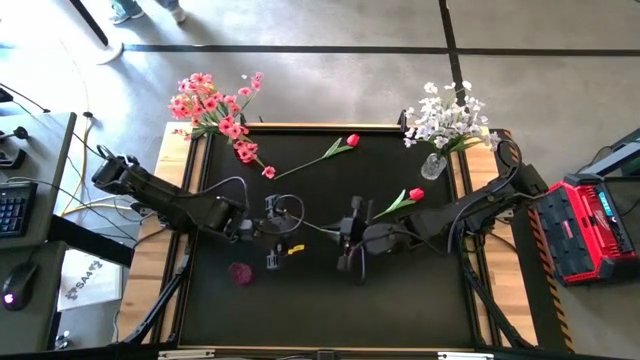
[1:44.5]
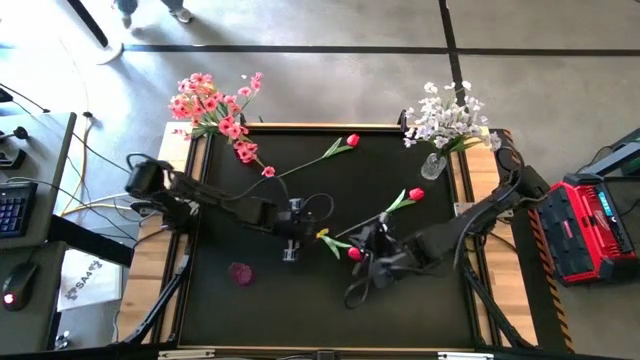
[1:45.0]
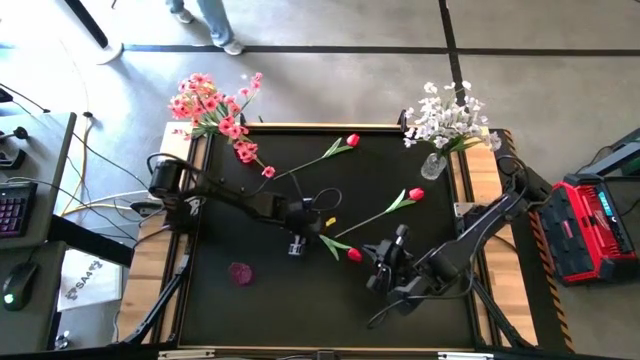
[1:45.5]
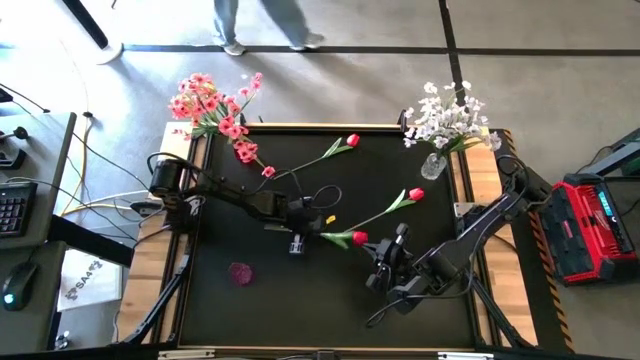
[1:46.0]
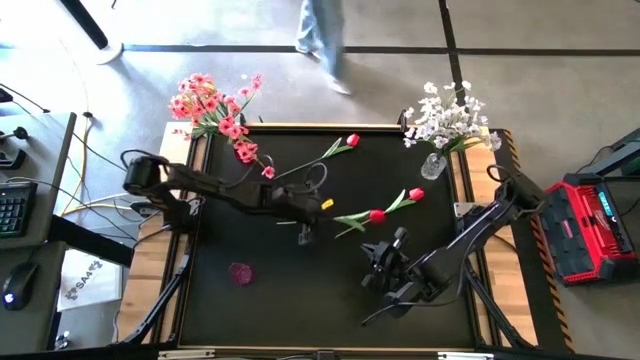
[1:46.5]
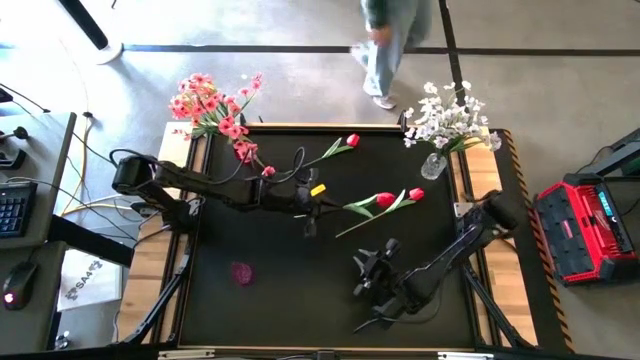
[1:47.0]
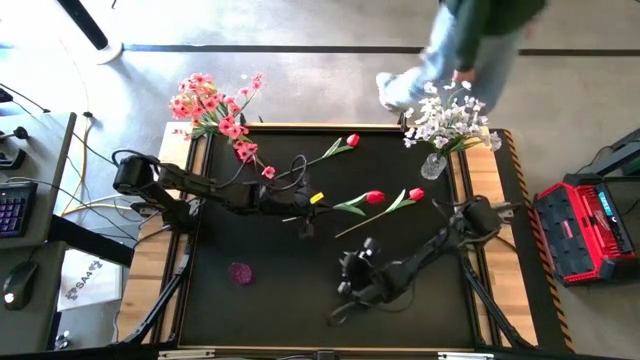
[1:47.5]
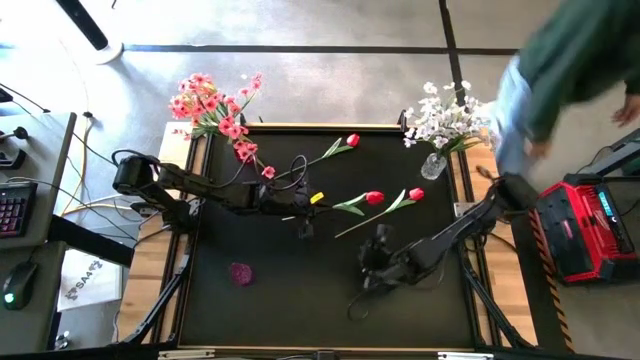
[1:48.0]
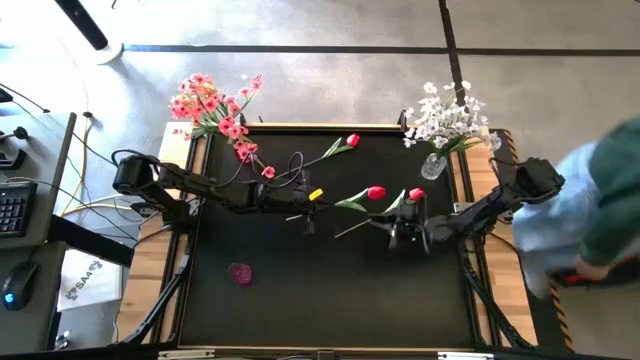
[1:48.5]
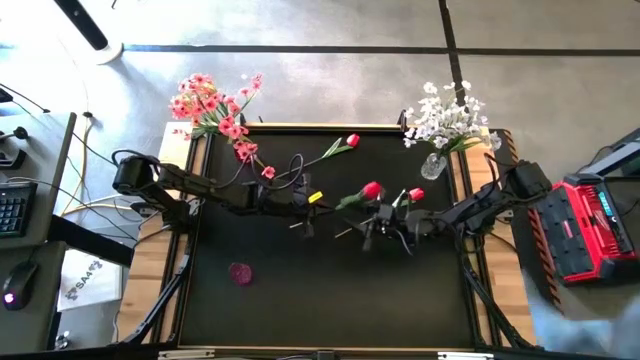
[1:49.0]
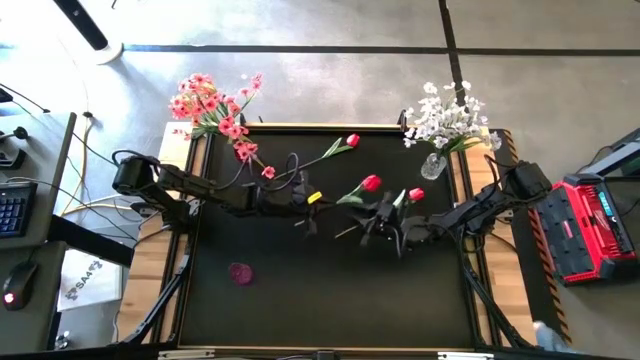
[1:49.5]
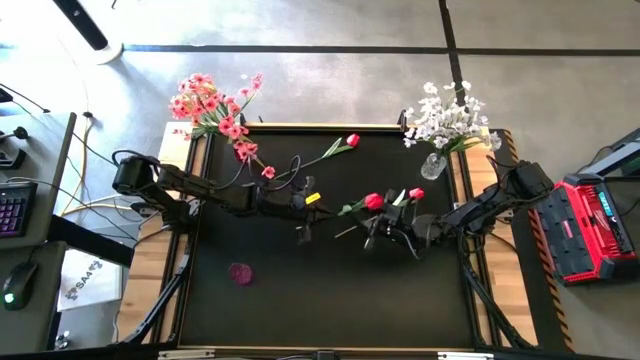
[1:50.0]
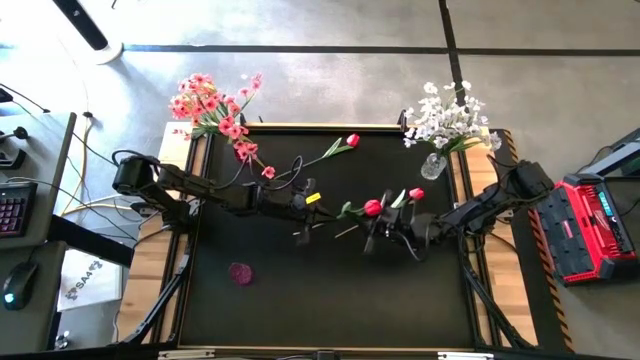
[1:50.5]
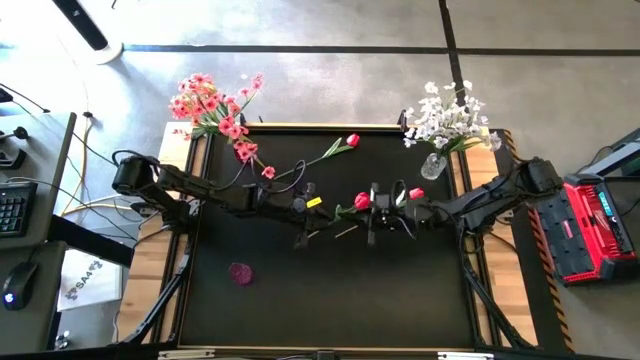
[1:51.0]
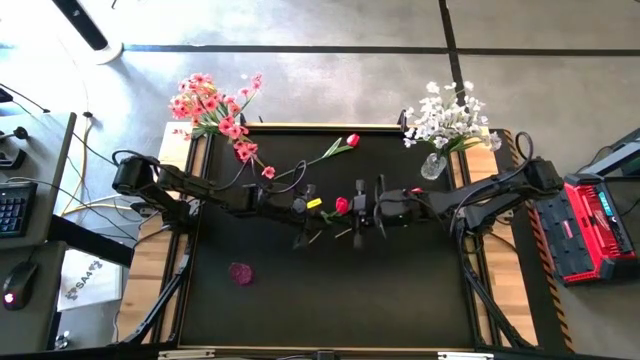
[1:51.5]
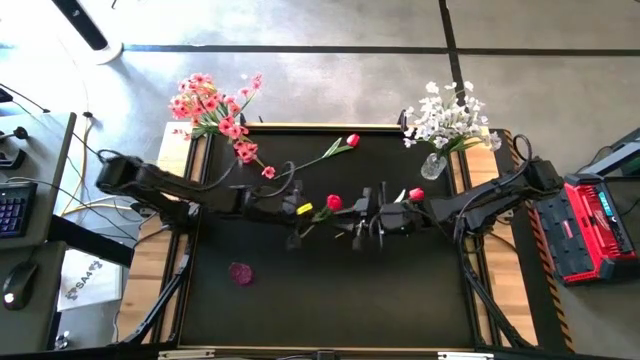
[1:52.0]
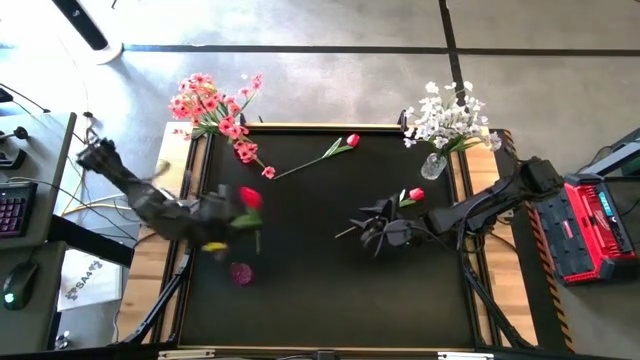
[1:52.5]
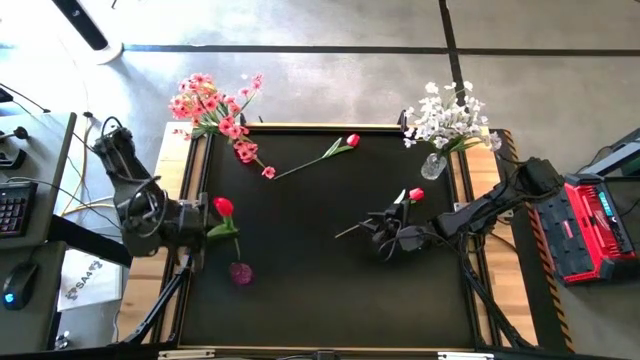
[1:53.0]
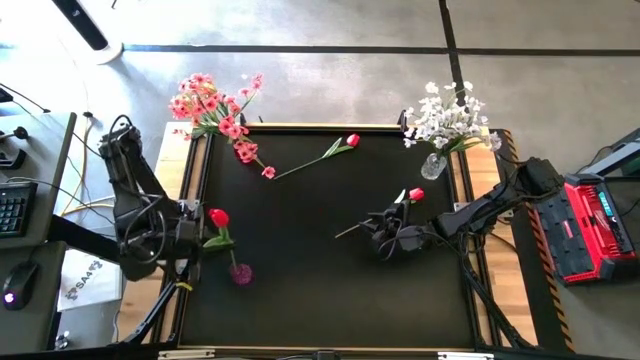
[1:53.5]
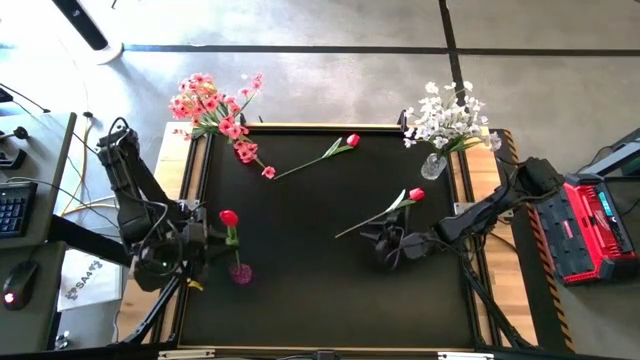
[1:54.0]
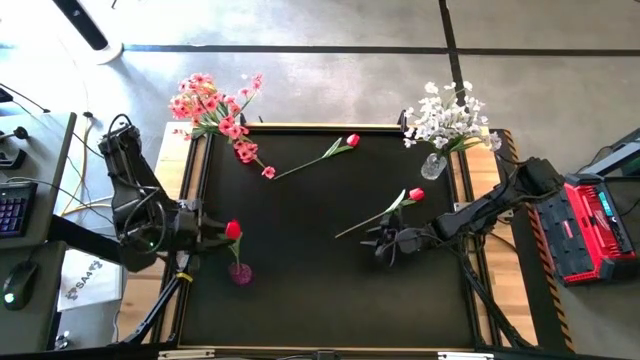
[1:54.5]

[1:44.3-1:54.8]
Task: Sort flowers into vase by color
Put the center red flower into the violet vase

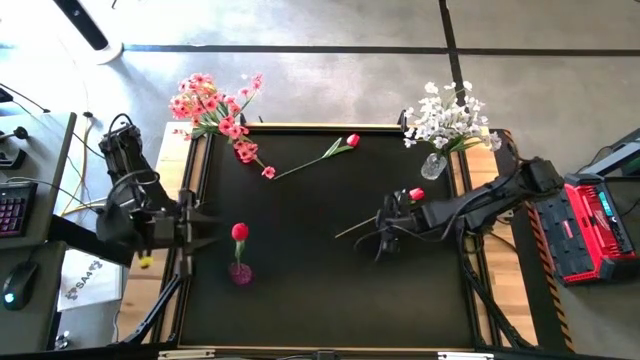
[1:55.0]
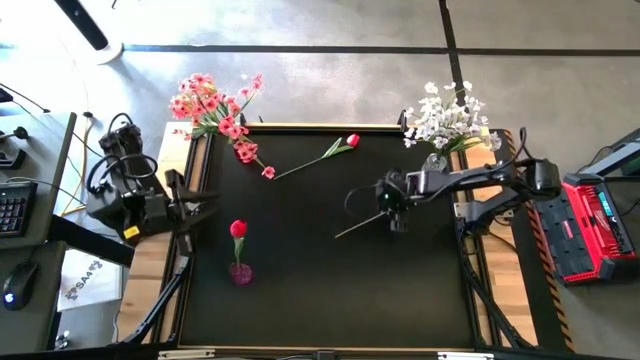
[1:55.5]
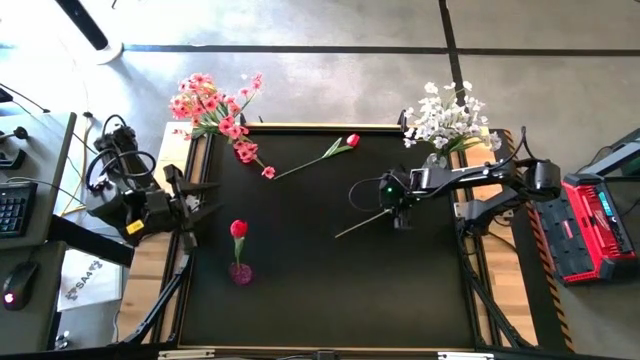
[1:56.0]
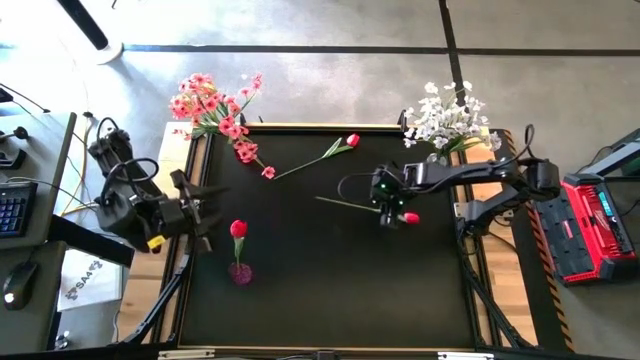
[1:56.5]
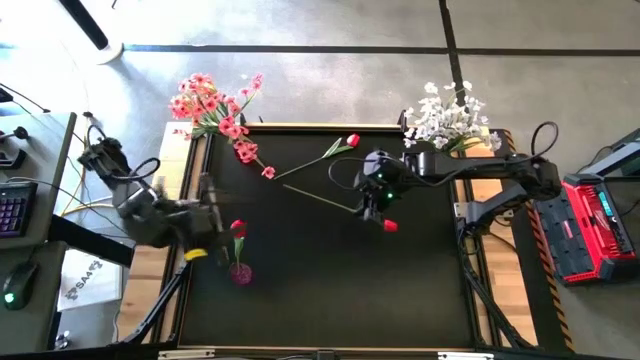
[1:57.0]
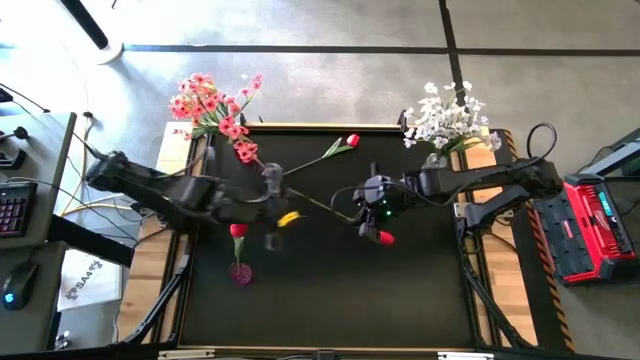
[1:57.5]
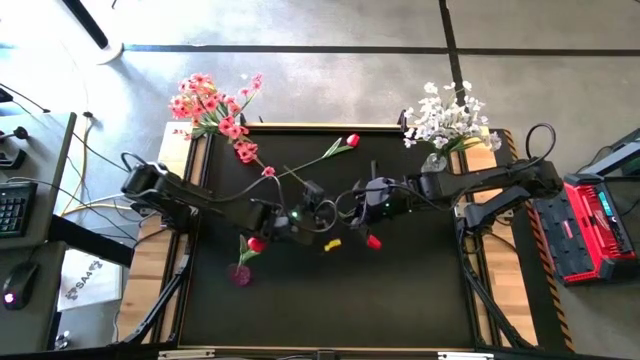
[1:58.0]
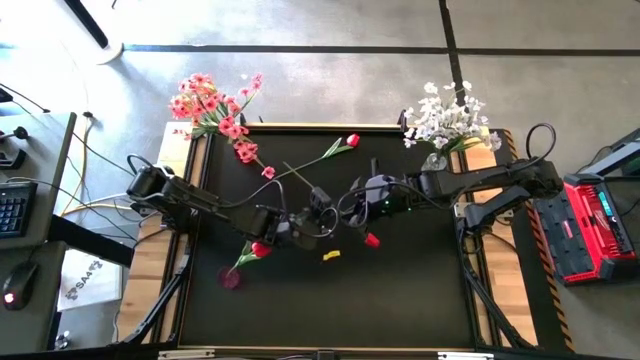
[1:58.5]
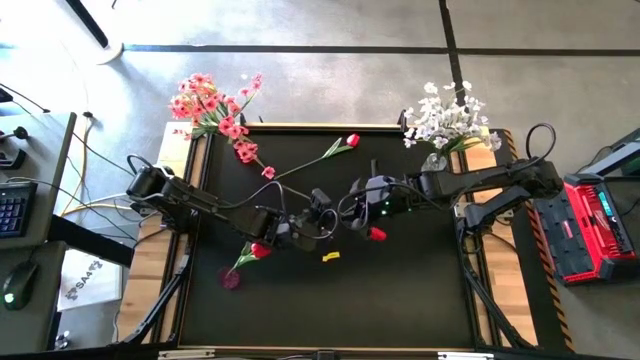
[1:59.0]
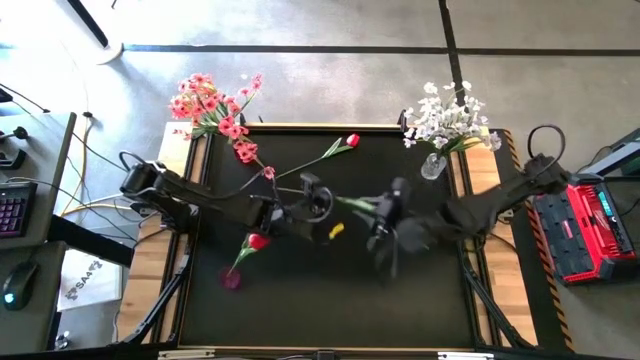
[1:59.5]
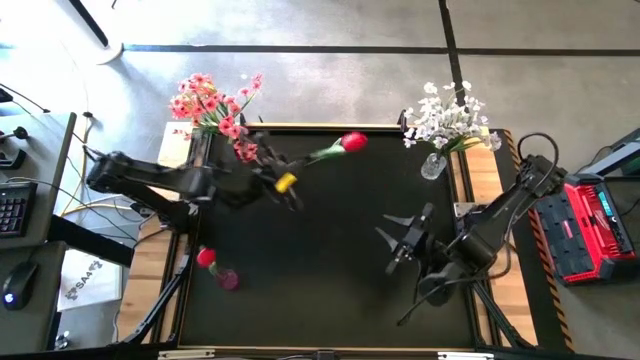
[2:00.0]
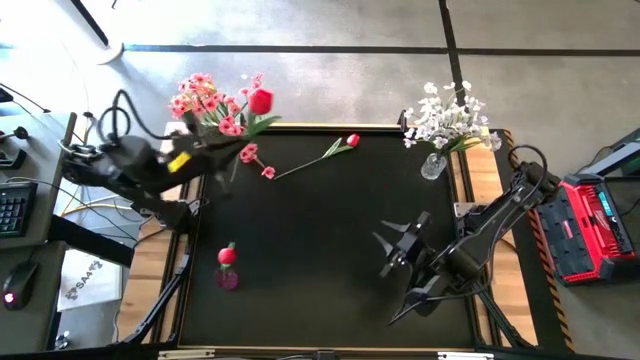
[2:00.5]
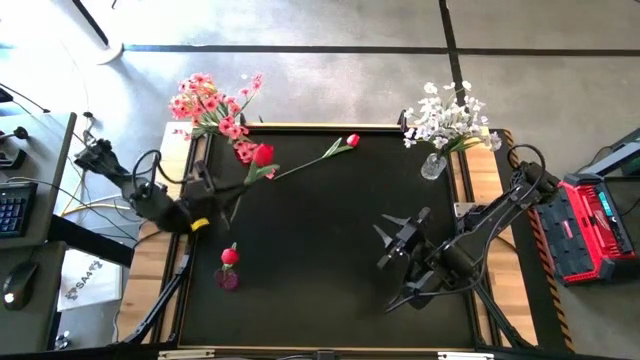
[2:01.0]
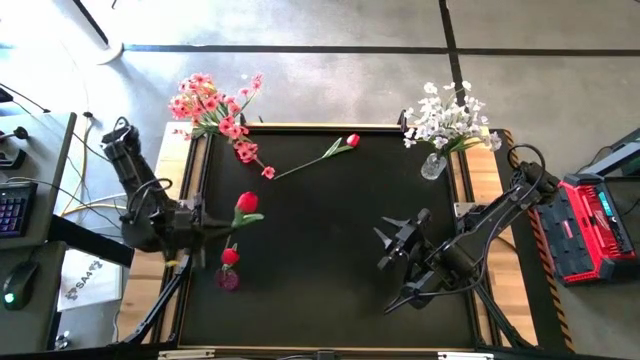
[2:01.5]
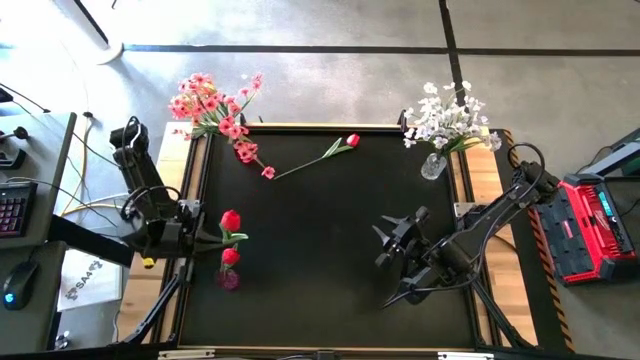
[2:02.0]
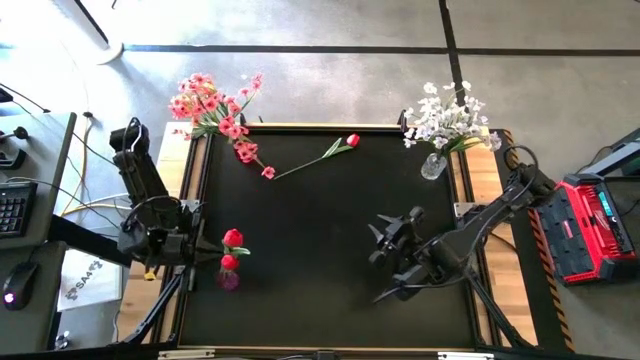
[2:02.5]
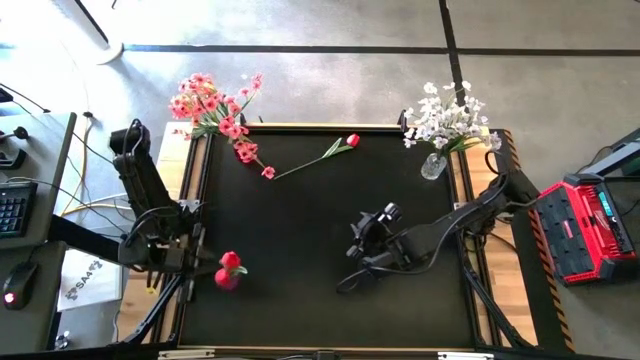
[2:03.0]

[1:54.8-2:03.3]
Put the bottom red flower into the violet vase
